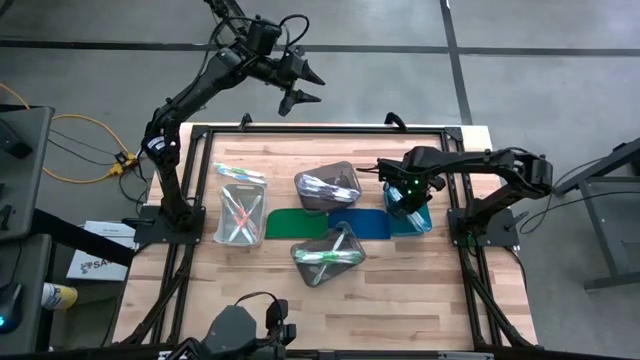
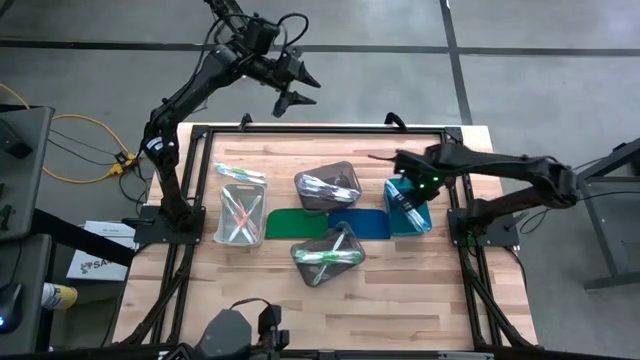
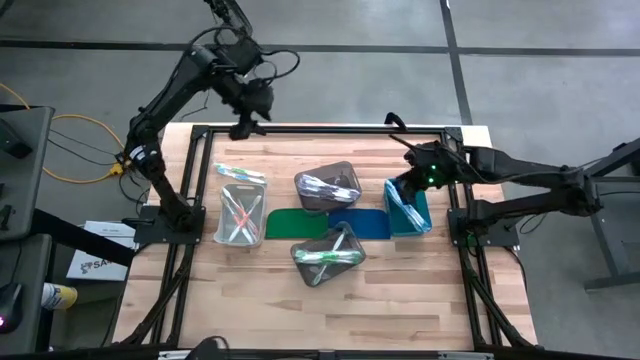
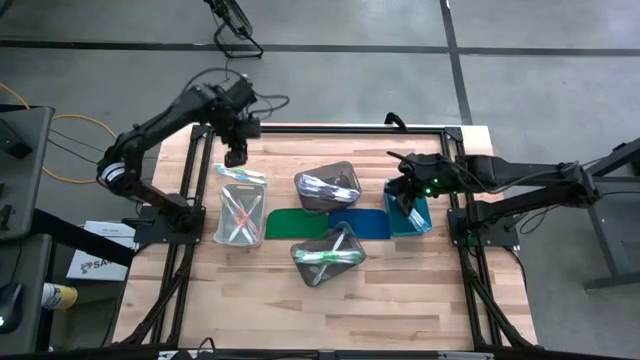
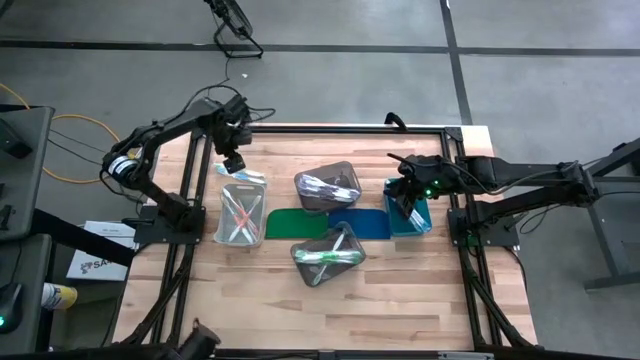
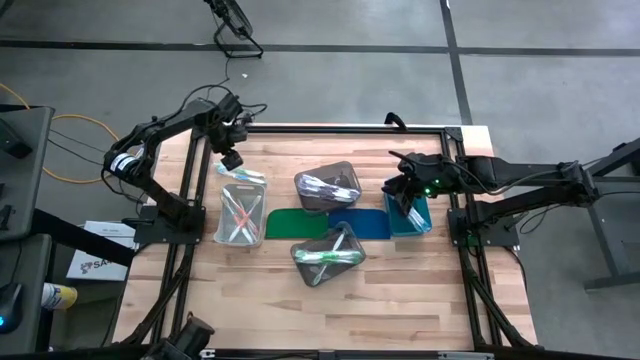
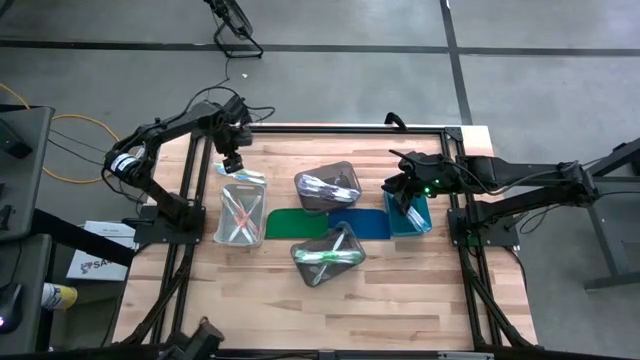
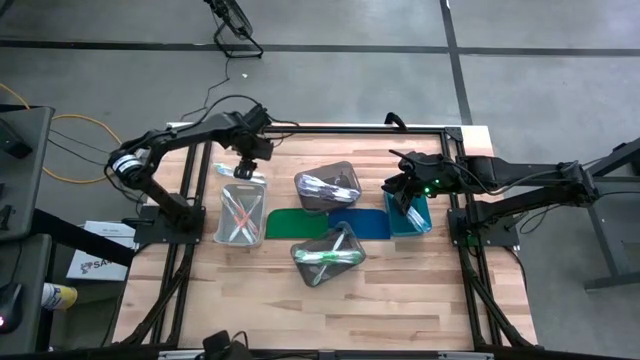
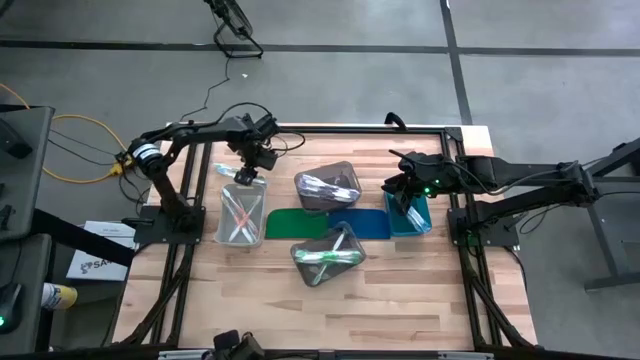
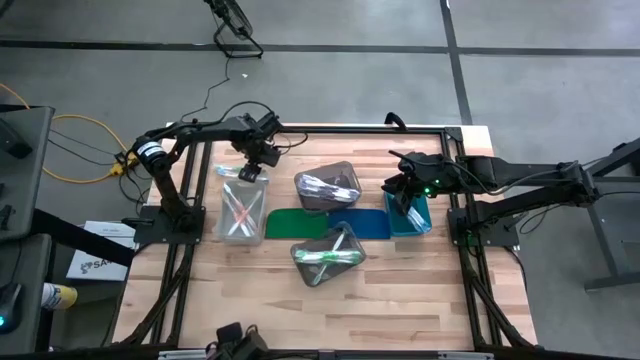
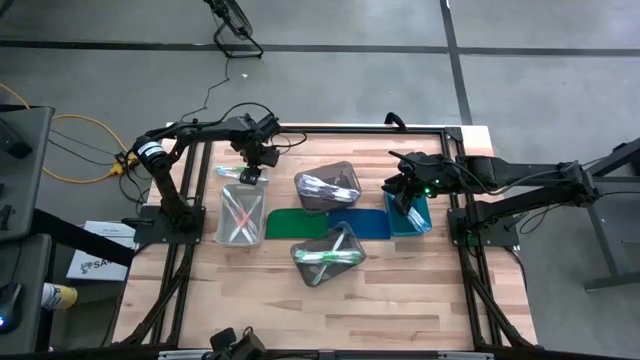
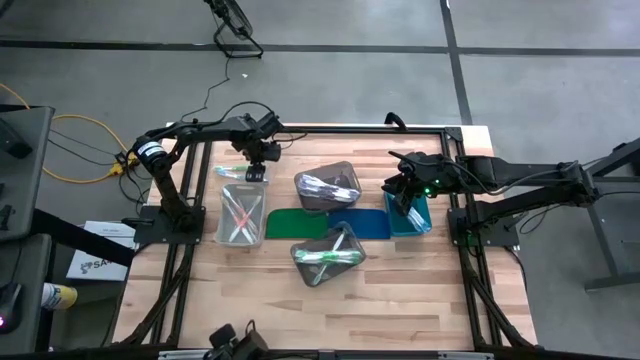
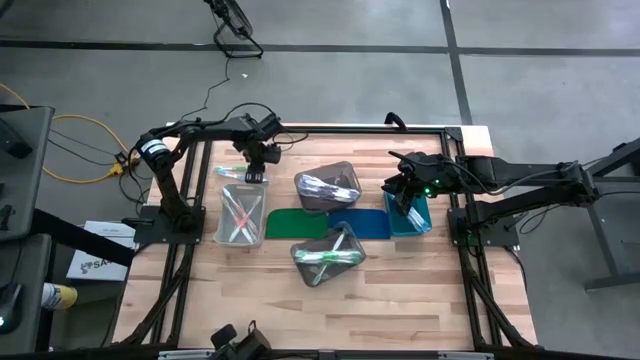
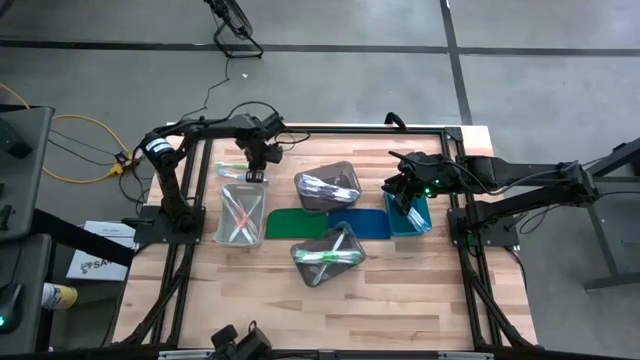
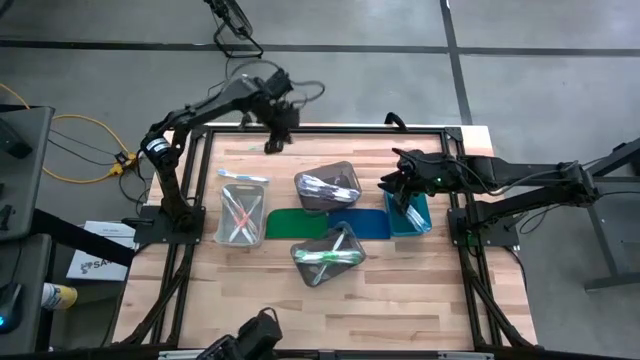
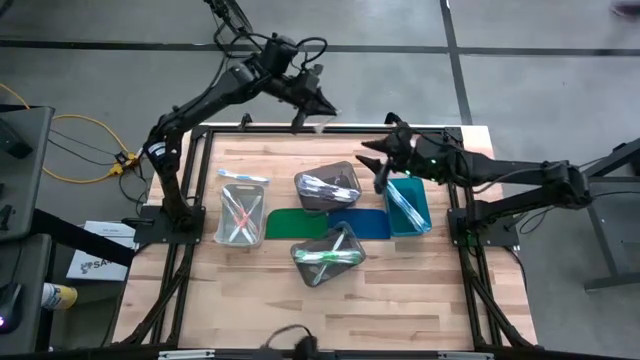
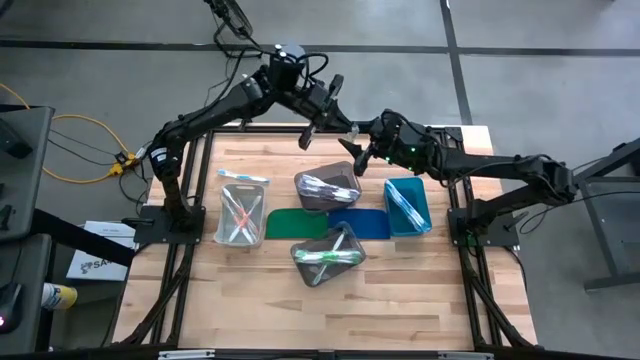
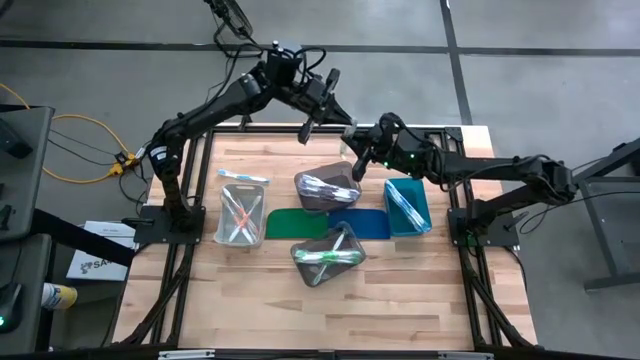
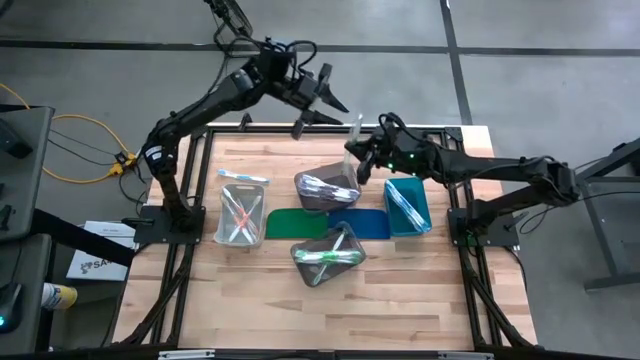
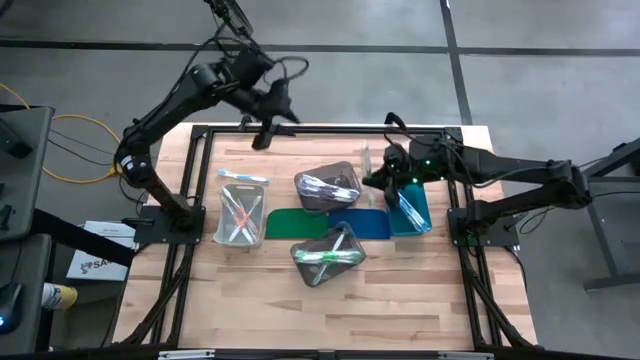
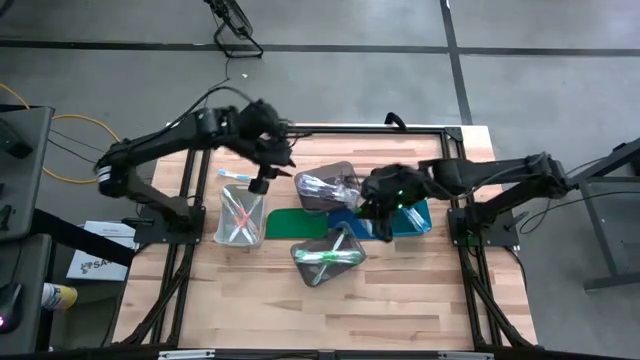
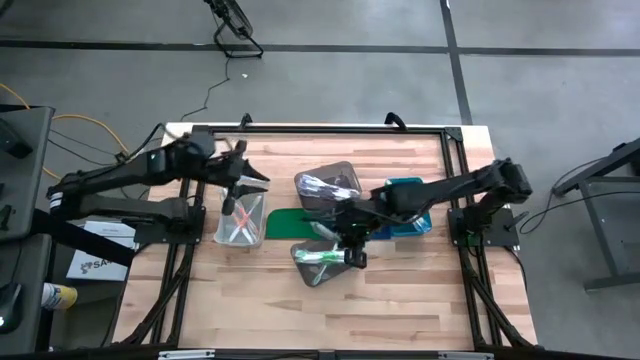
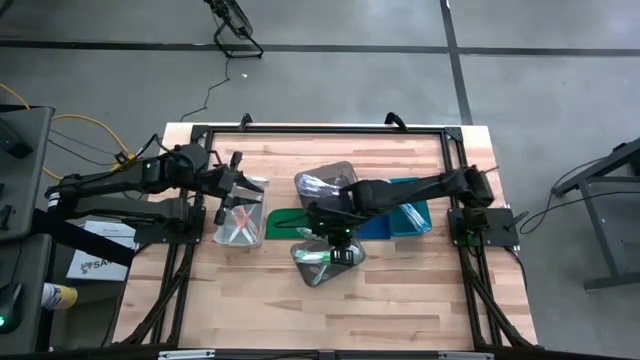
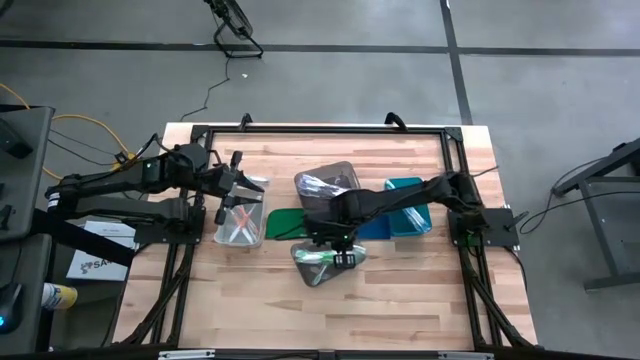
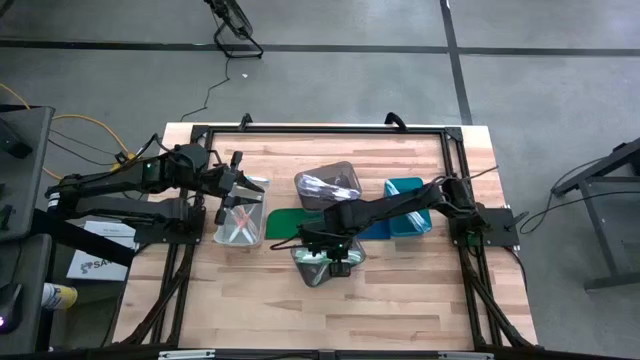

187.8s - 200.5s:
Task: Pick & Place Toothbrushes
Put the green toothbrush into the bottom black bin

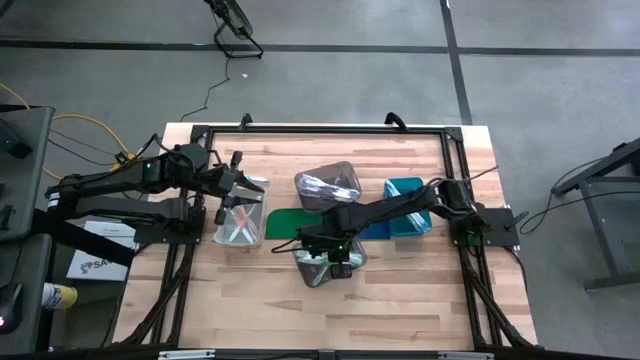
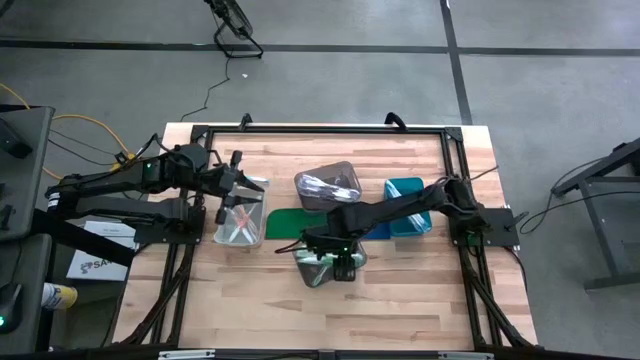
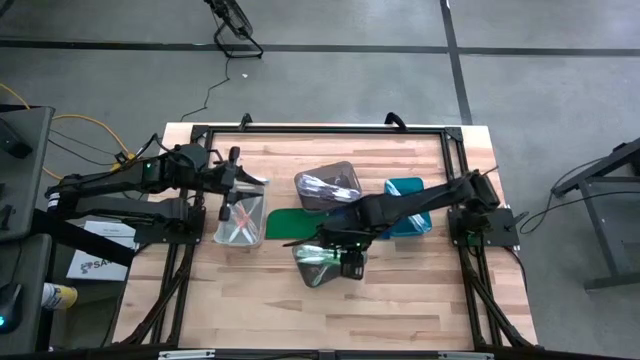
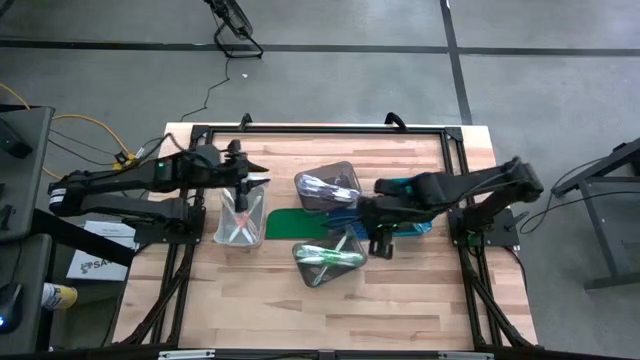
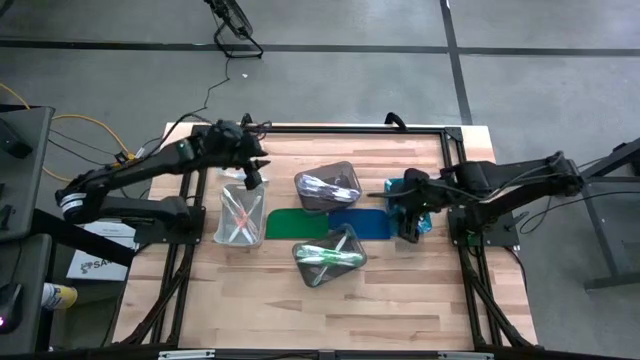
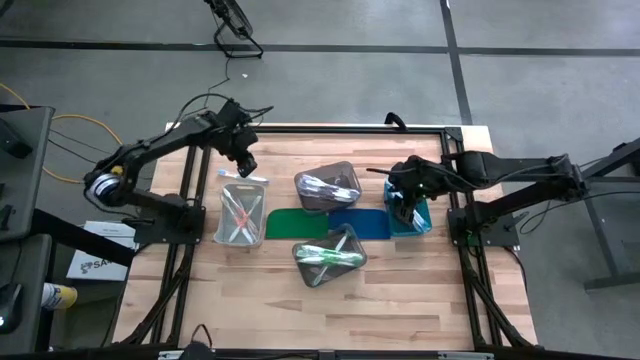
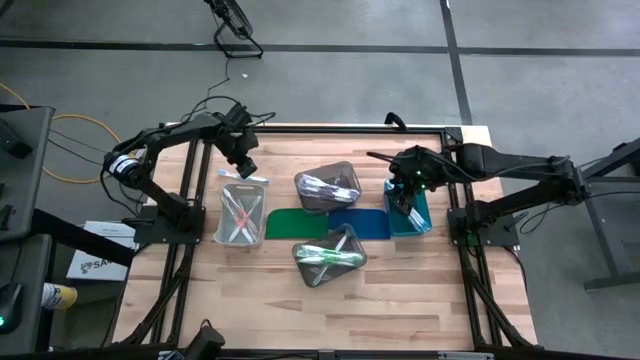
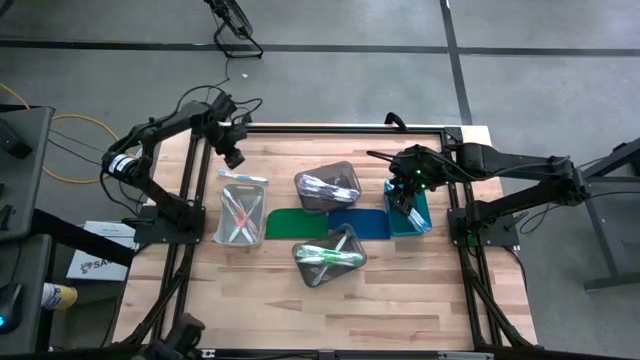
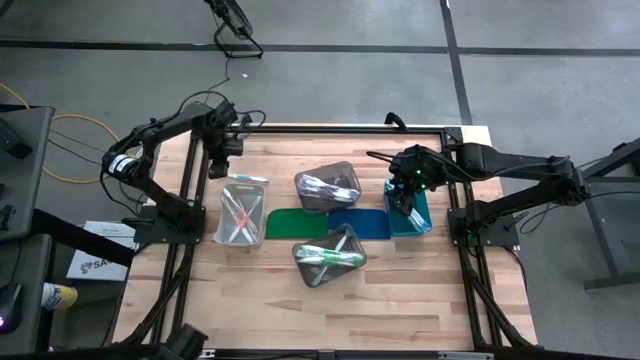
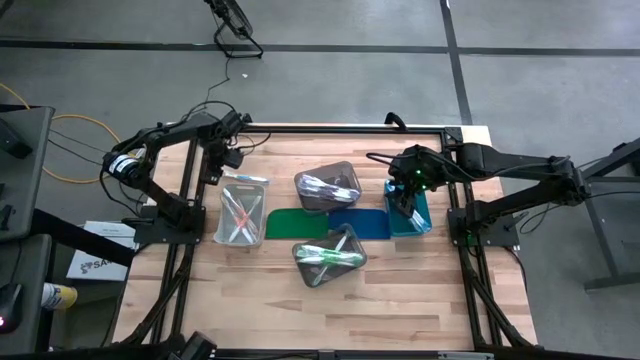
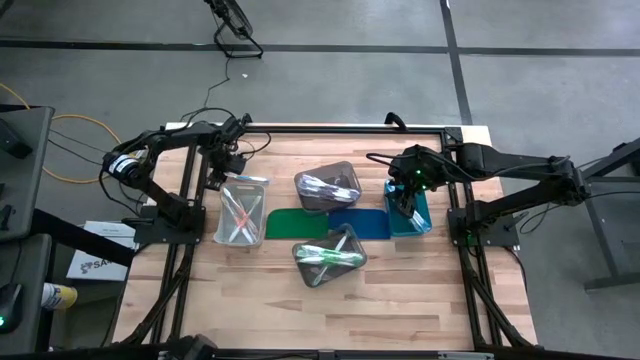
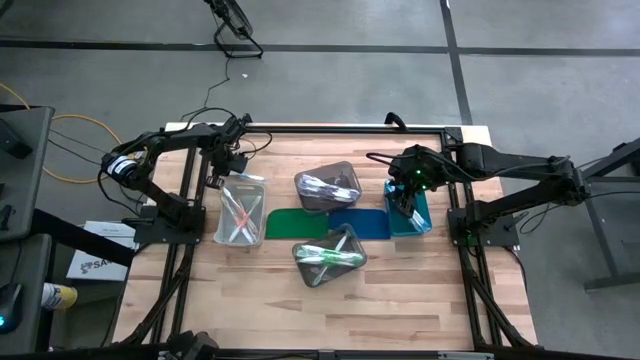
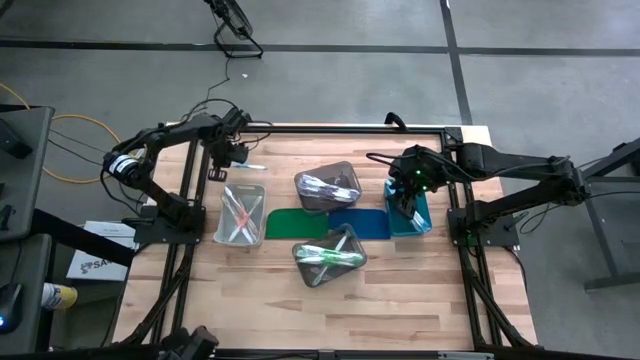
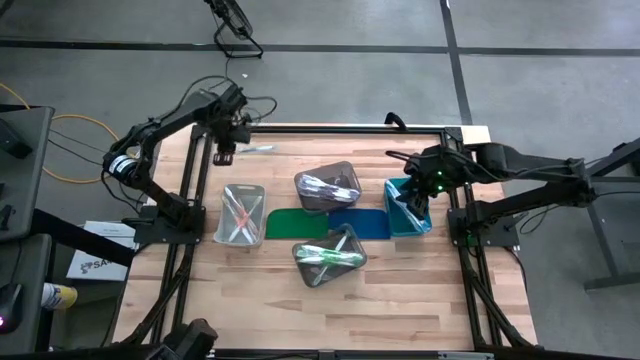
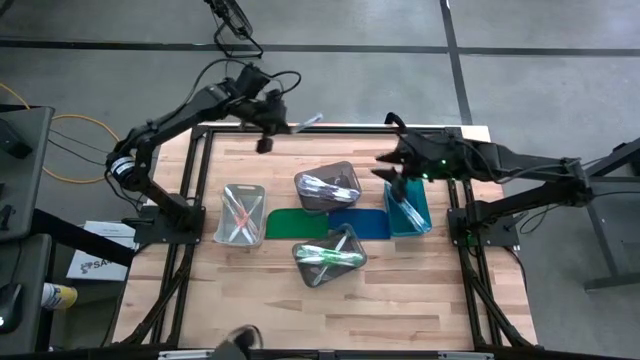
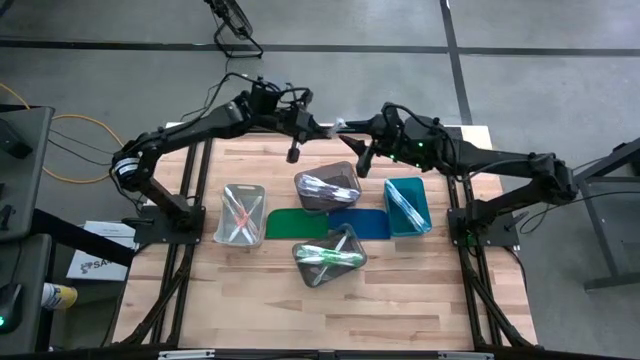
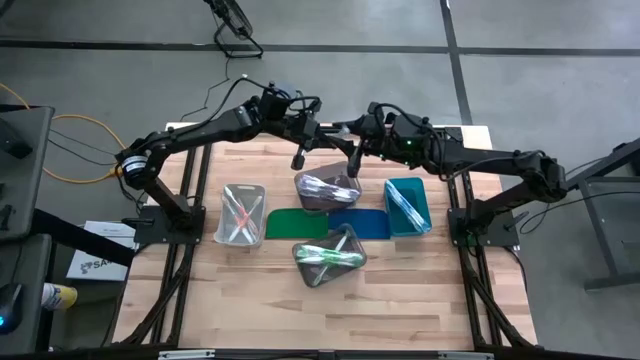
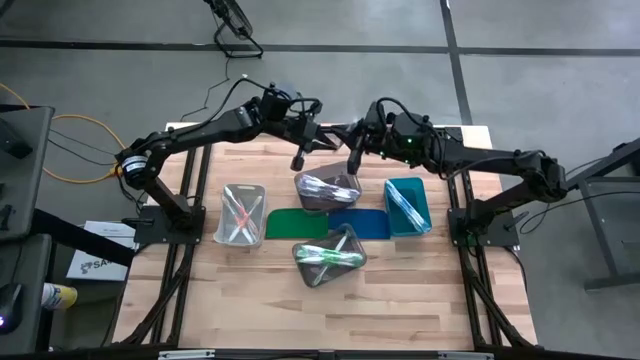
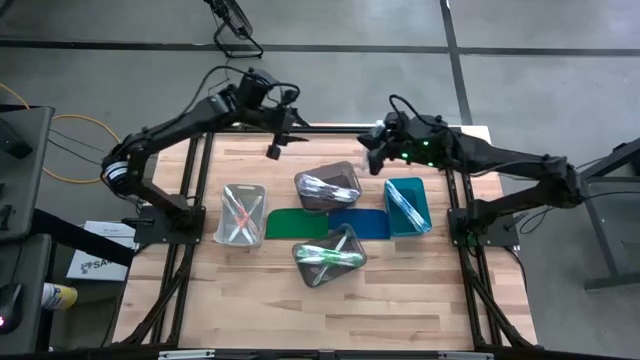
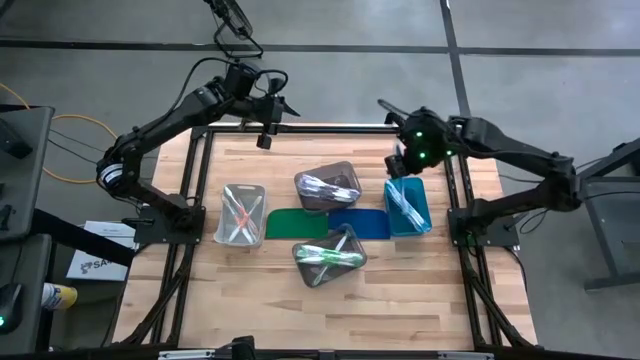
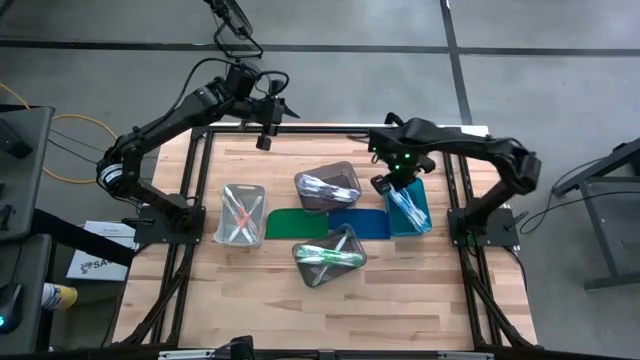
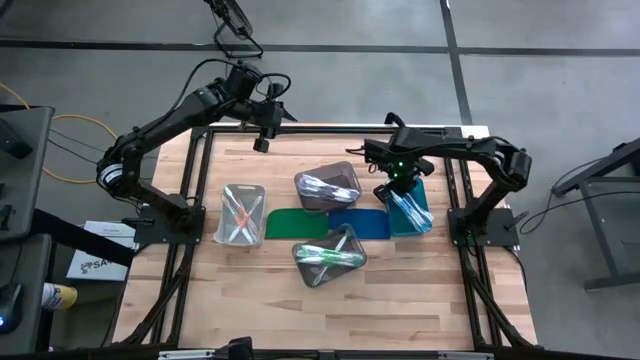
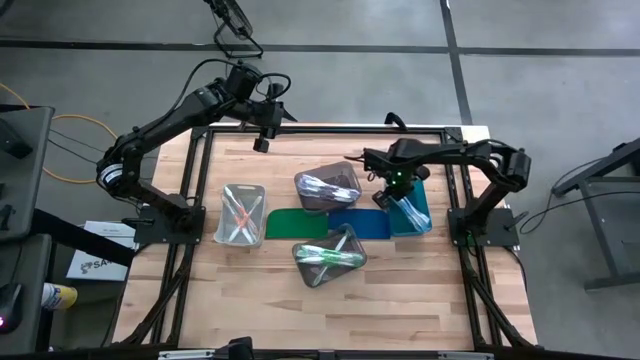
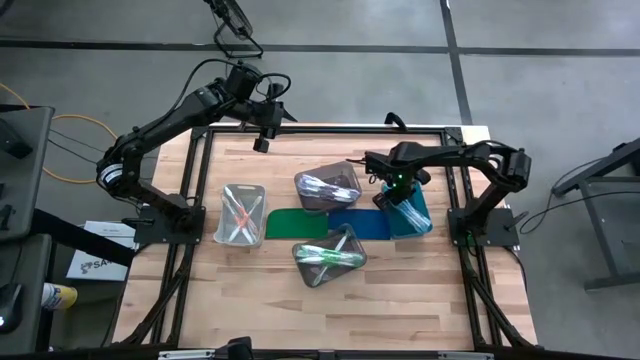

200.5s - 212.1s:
Put the blue toothbrush into the blue bin
